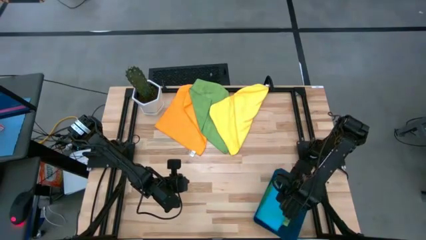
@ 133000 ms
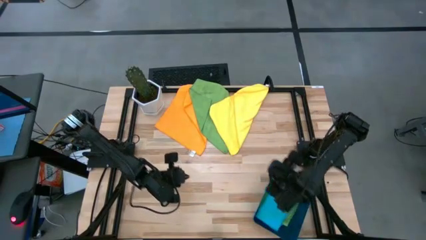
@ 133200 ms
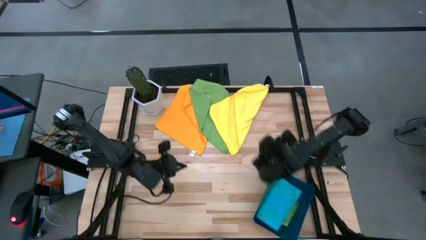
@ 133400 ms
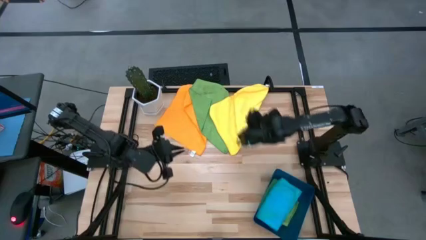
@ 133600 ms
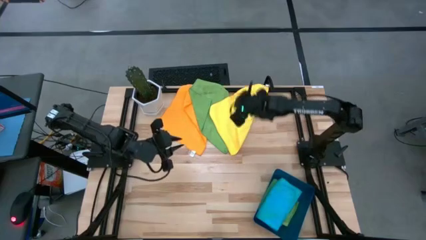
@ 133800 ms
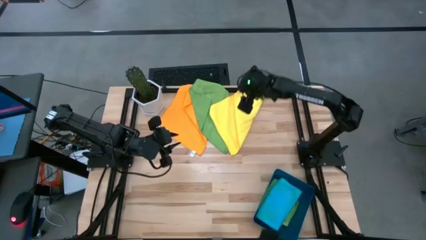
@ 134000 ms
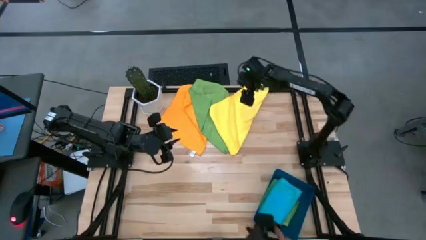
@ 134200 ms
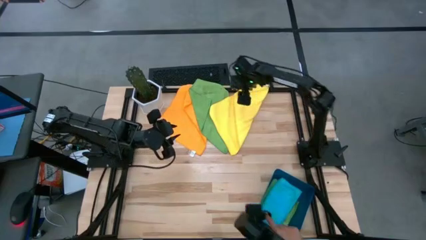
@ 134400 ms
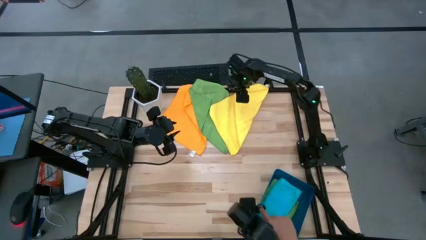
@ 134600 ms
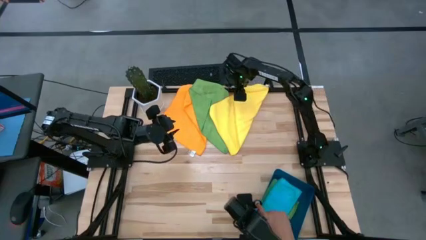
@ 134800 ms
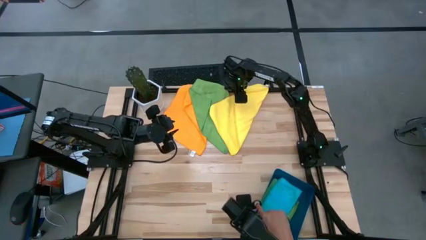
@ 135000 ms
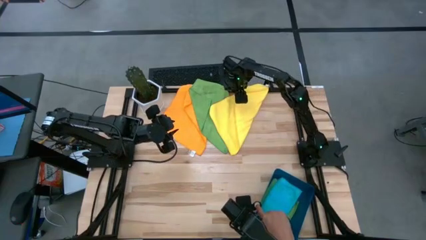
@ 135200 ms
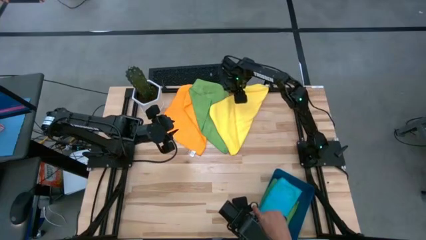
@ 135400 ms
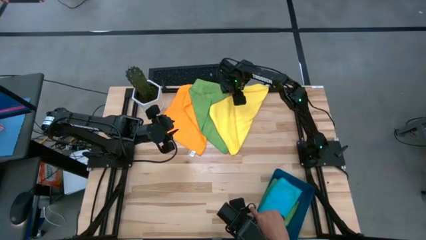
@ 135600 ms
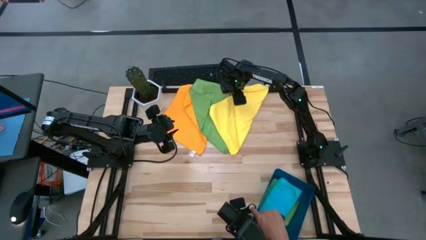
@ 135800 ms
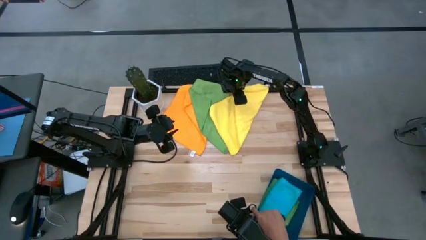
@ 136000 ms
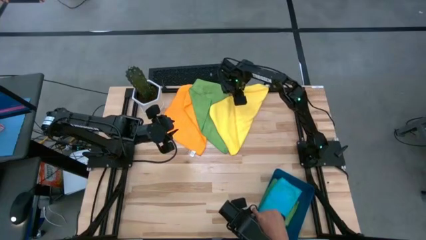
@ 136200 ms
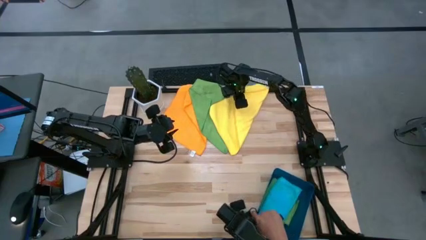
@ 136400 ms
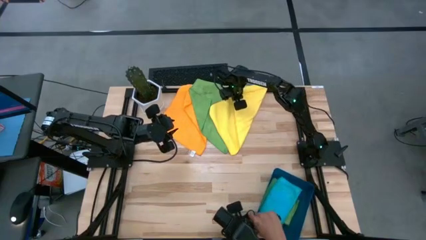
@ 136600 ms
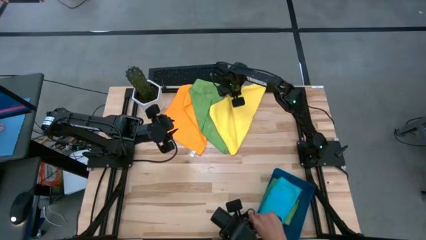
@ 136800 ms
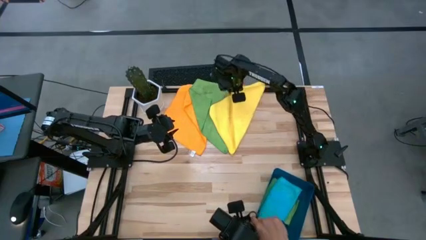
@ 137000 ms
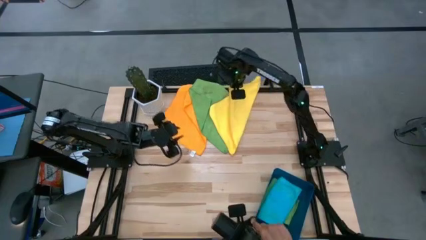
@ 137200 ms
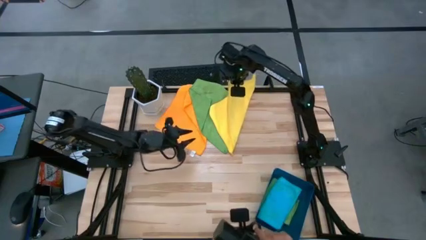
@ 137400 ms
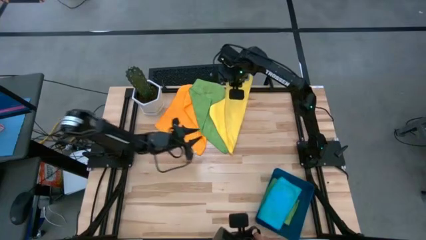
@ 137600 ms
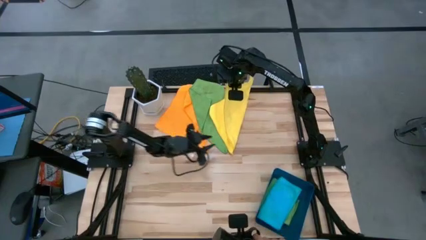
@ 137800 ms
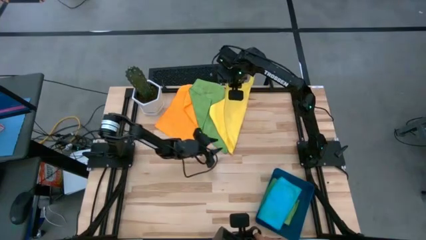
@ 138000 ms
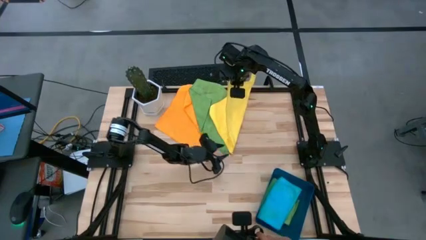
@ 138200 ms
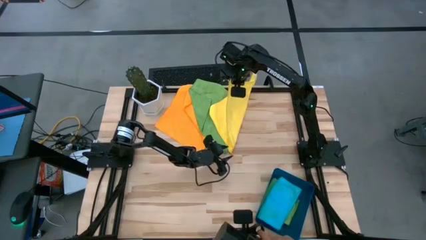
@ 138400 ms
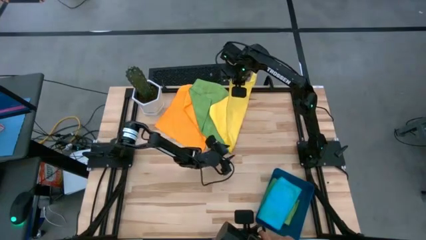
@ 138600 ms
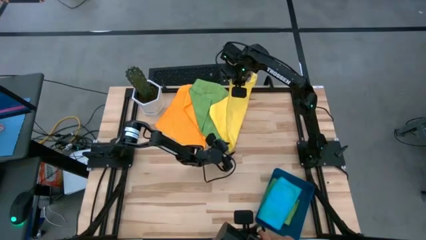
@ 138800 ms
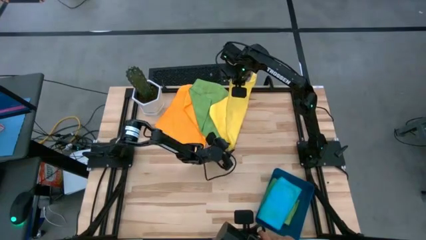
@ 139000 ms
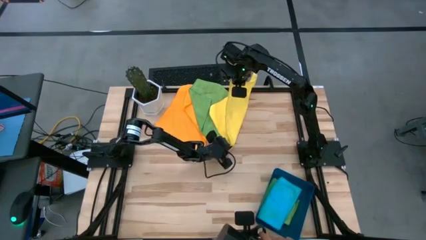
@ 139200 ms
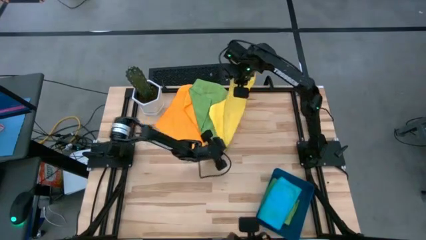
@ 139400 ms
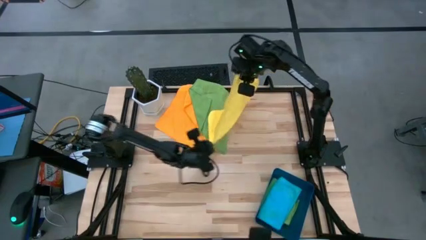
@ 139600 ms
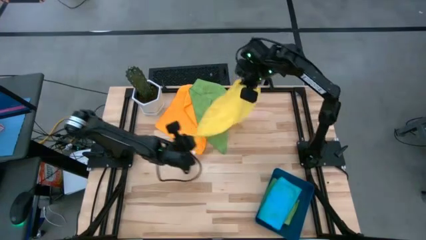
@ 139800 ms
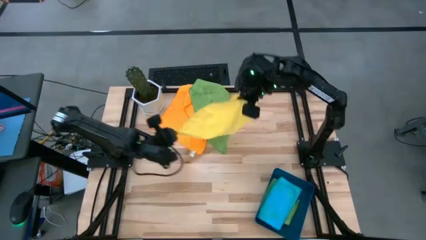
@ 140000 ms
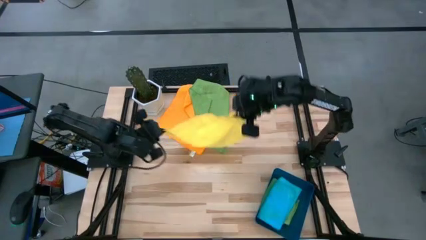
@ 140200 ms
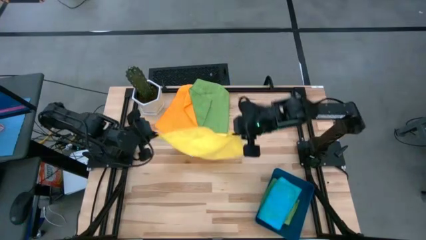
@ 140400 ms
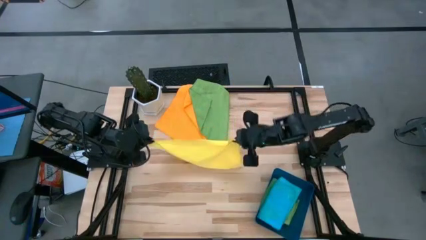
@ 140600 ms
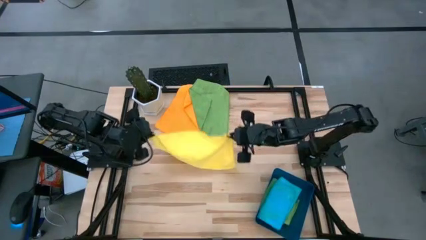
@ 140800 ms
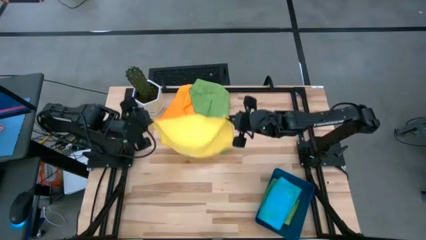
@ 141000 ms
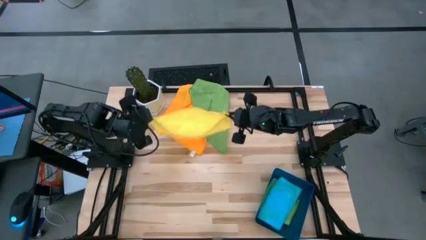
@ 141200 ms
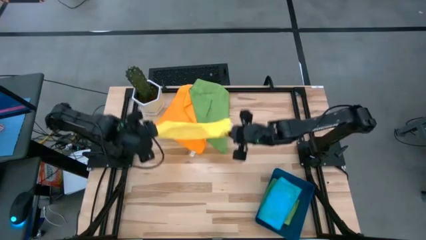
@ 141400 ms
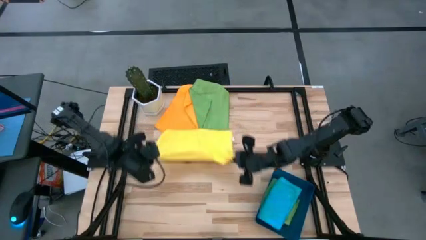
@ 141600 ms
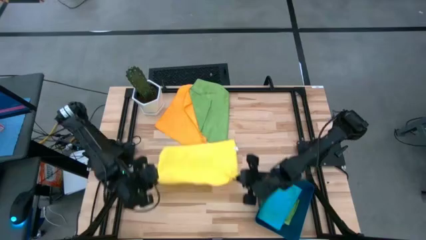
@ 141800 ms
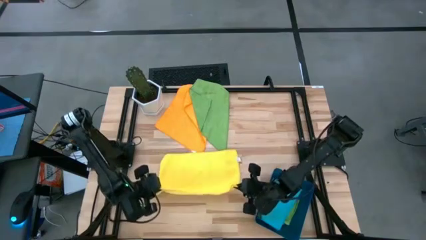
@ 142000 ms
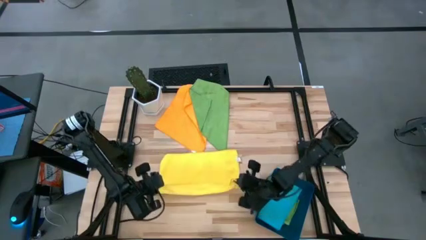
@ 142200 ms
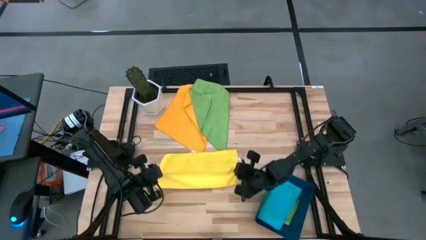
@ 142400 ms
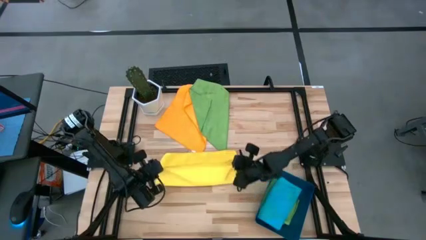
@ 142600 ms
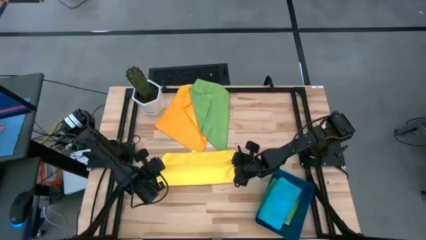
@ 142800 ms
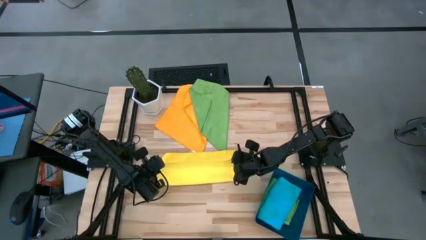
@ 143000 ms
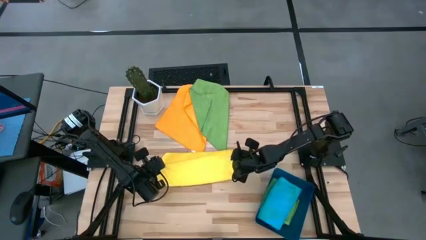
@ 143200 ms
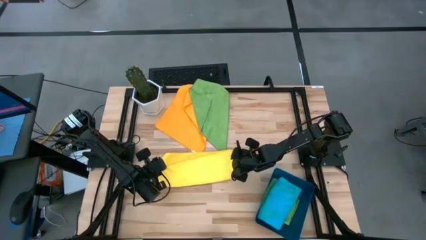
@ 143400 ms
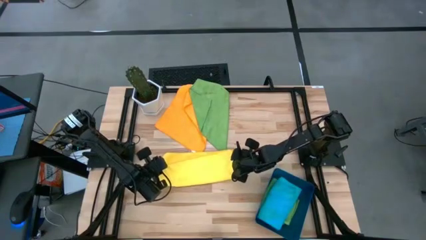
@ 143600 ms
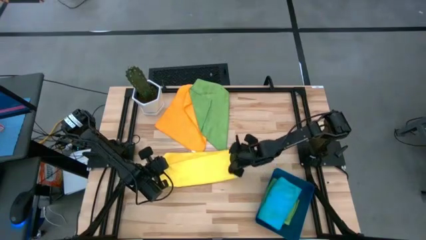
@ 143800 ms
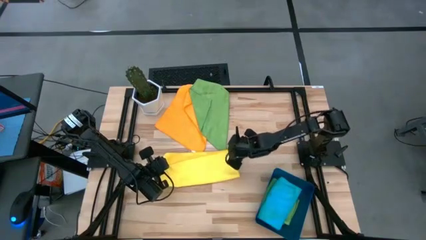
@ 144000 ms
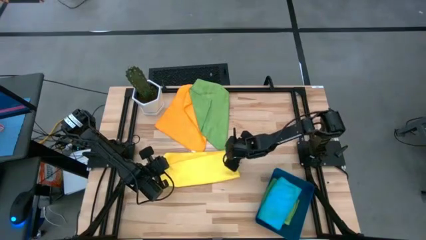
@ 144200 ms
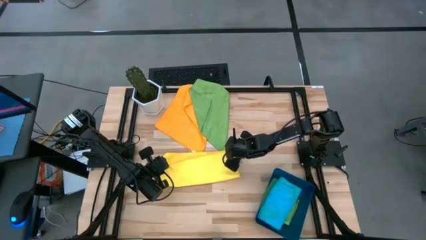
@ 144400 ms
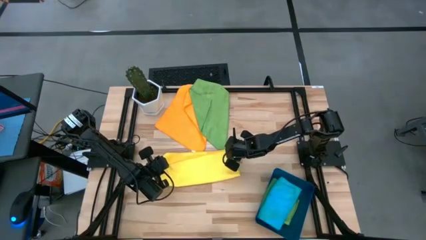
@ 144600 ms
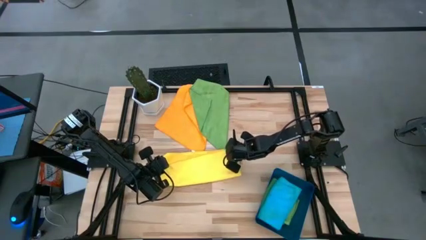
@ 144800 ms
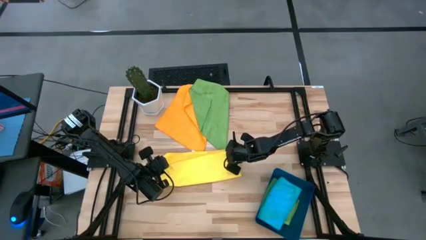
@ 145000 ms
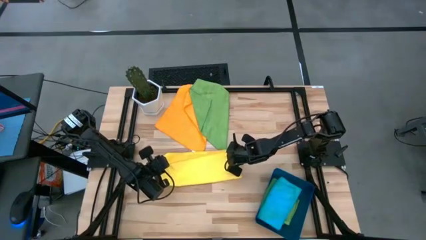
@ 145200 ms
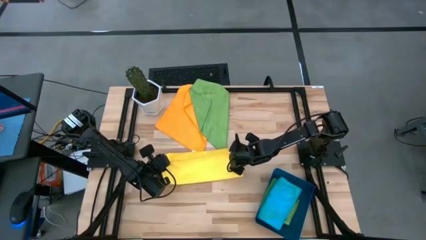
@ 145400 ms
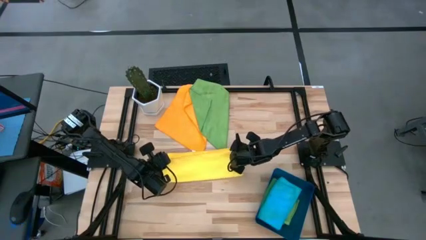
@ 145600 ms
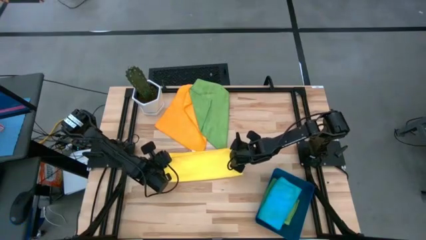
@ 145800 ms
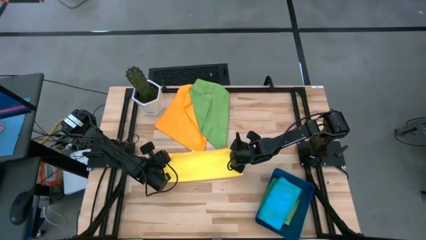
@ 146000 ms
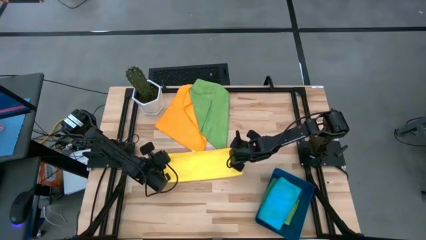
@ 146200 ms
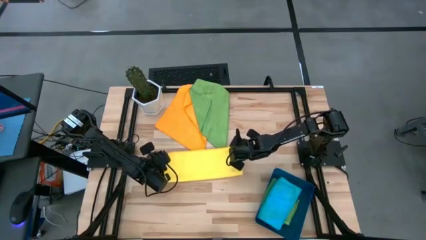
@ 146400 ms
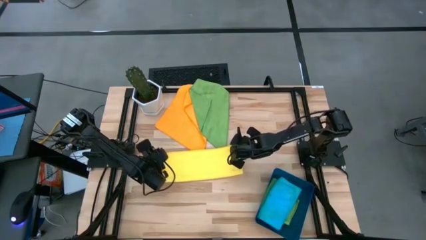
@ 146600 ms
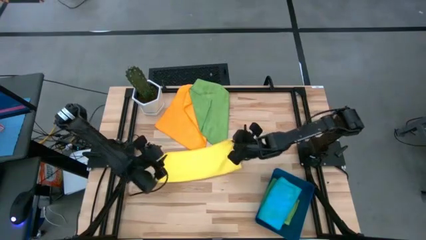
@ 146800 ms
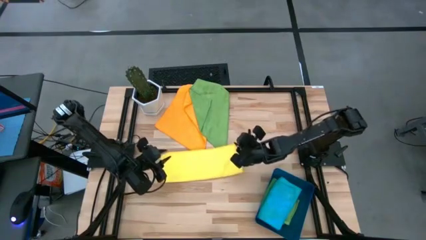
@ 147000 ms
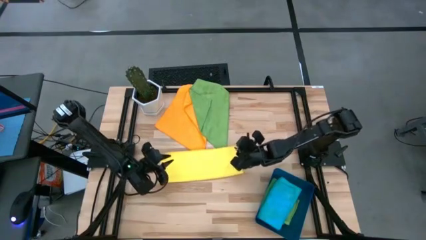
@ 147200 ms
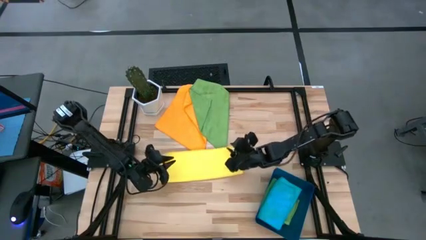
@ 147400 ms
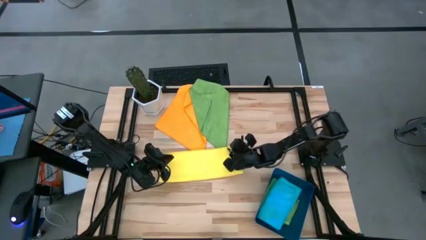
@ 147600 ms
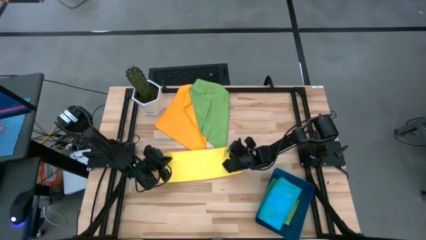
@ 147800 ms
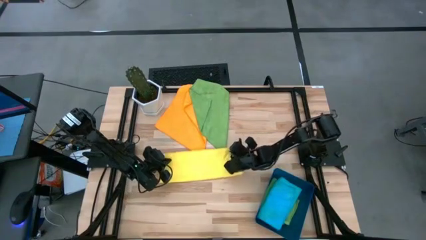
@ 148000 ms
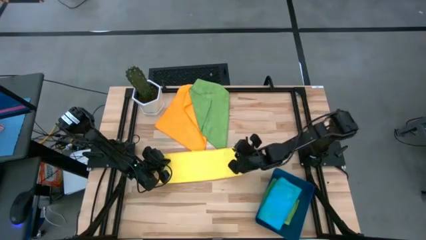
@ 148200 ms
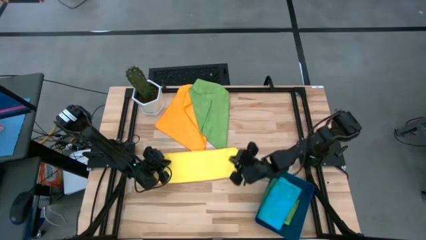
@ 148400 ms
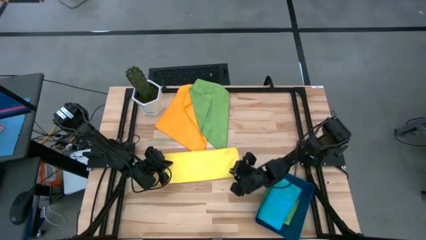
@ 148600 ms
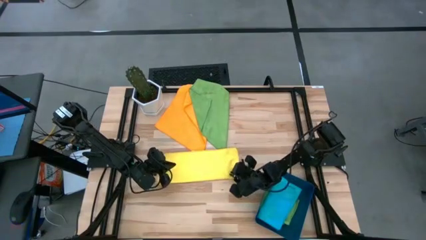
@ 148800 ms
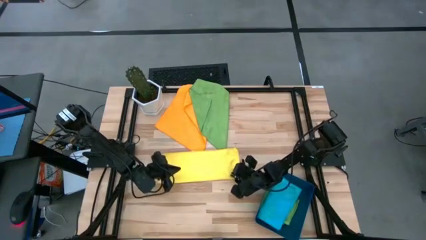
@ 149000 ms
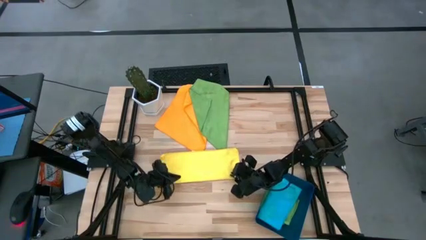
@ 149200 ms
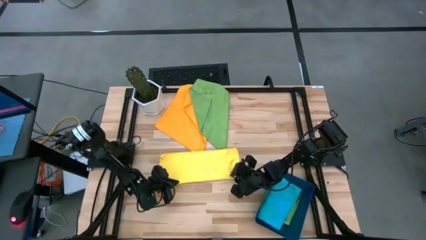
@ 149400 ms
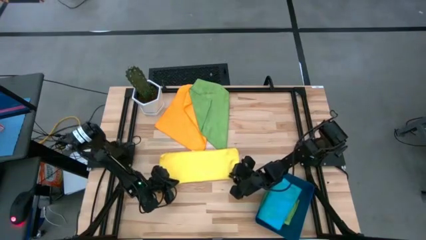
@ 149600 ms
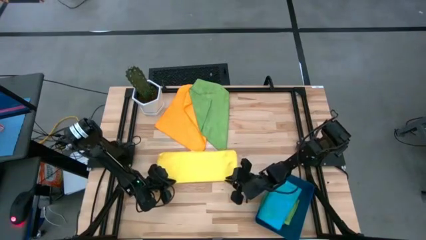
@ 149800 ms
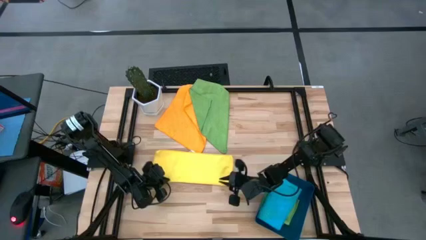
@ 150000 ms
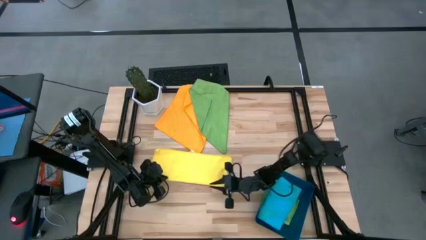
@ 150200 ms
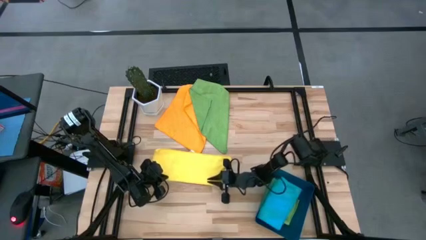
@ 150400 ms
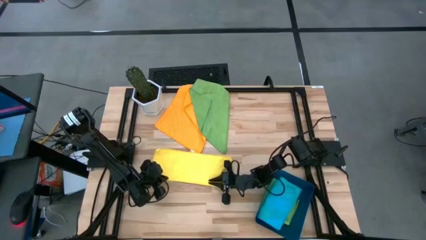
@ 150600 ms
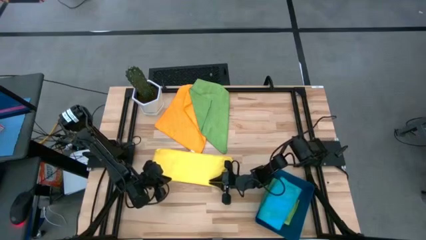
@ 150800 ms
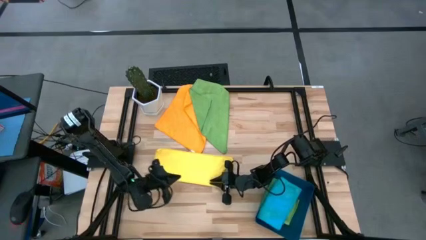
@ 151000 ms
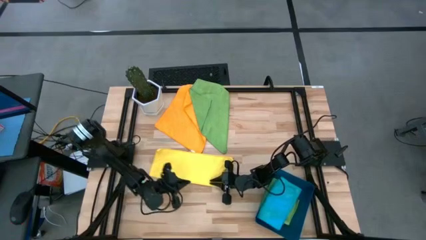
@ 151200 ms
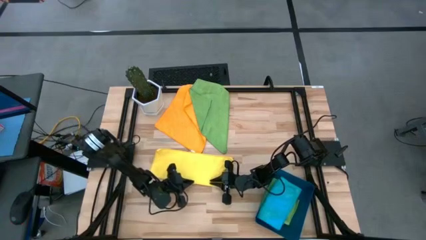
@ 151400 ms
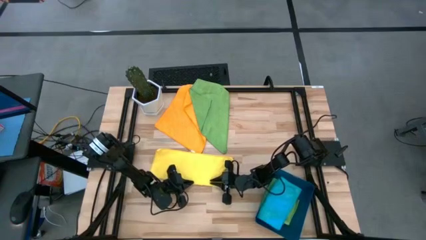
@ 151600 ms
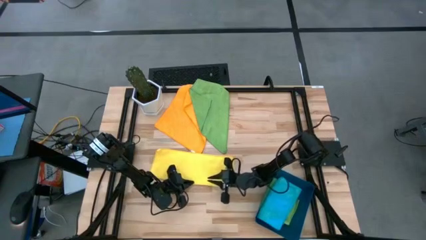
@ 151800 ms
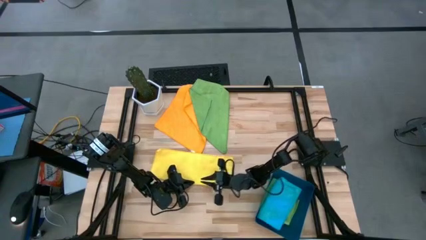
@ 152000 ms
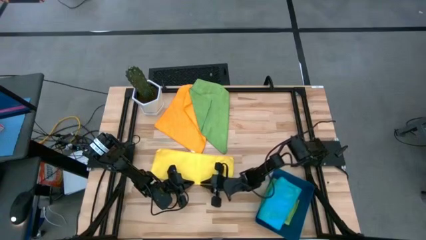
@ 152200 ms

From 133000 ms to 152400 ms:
Task: Fold microfiber towels
Fold the yellow microfiber towel
